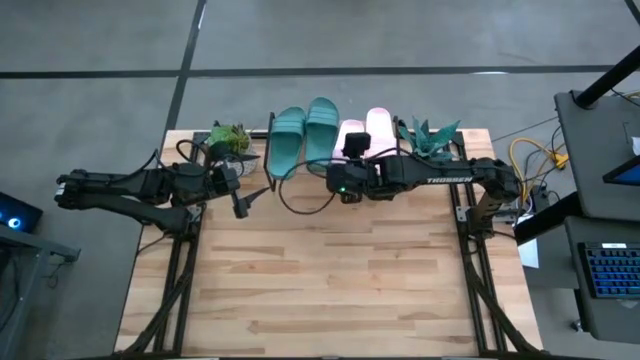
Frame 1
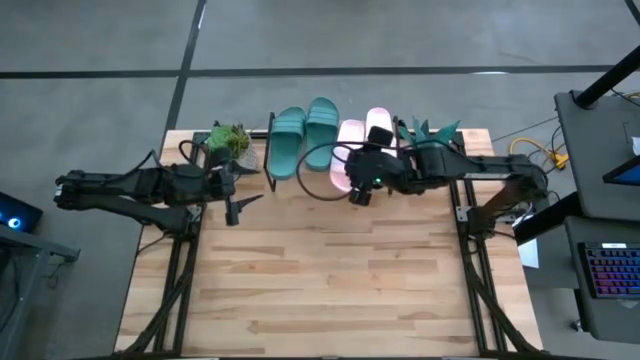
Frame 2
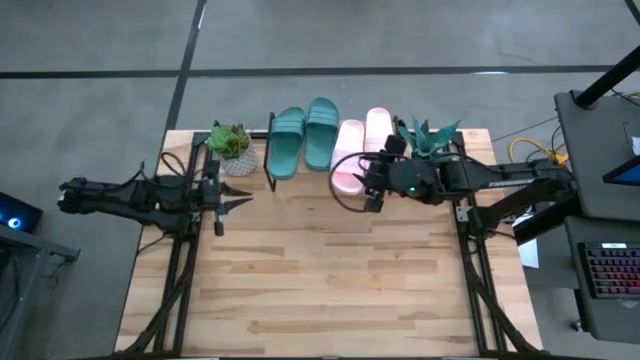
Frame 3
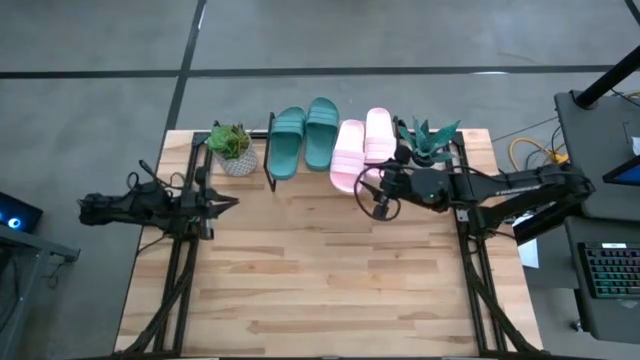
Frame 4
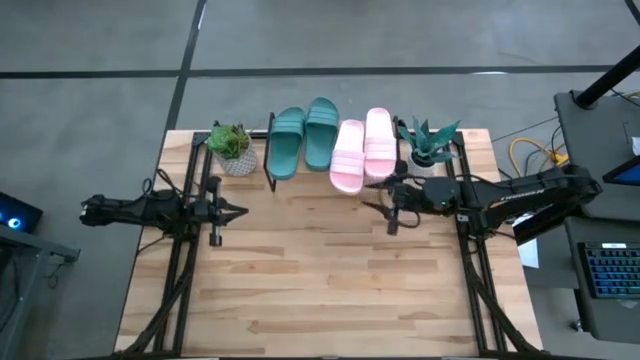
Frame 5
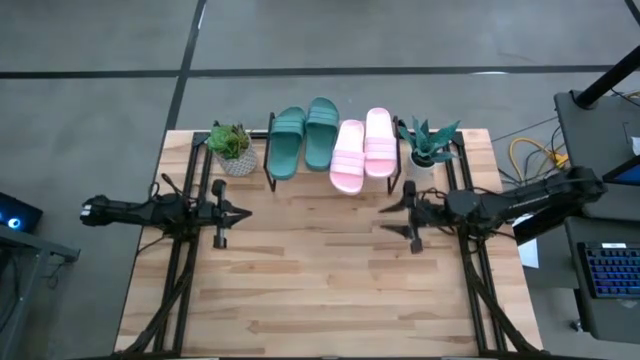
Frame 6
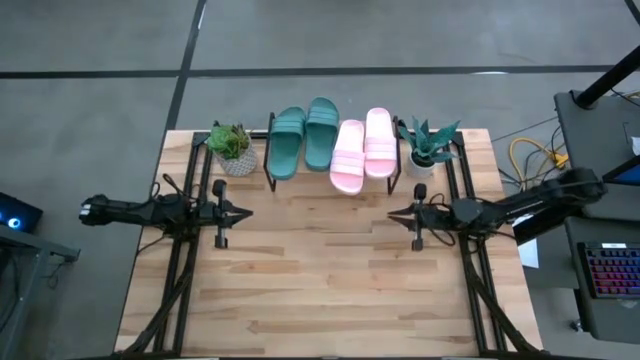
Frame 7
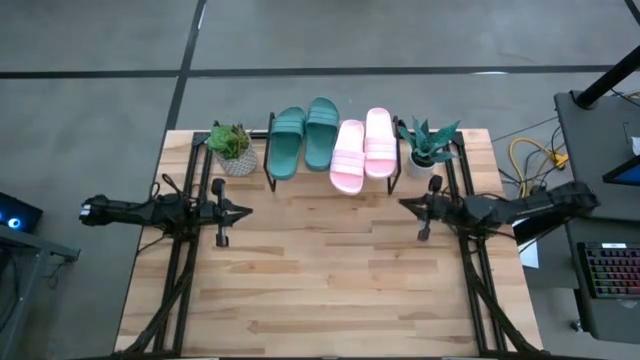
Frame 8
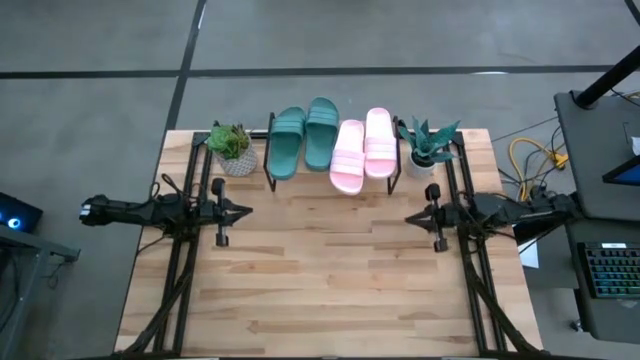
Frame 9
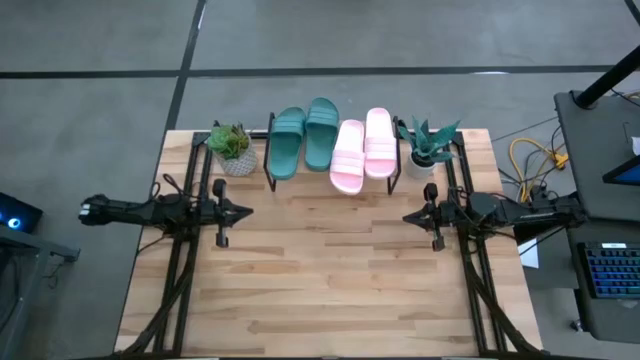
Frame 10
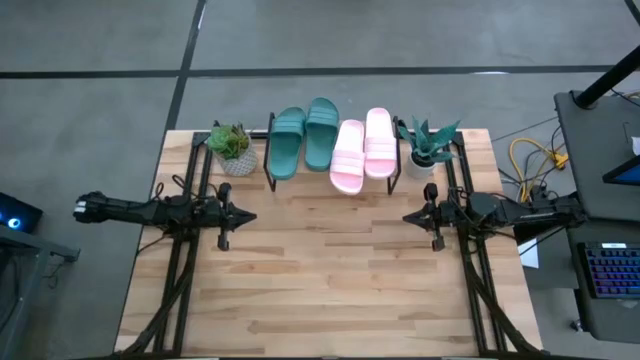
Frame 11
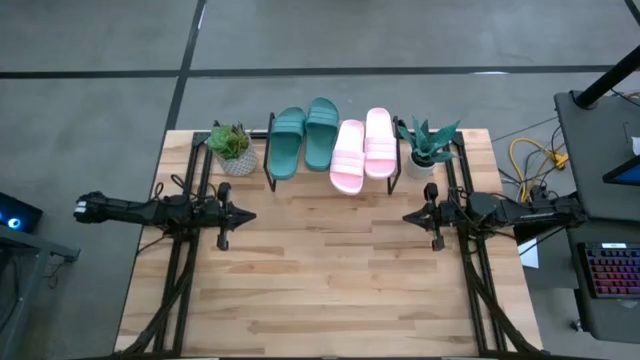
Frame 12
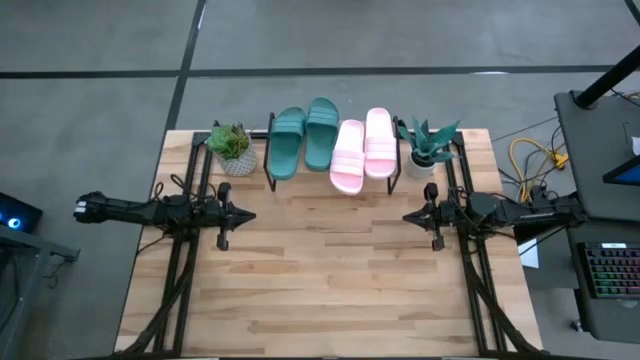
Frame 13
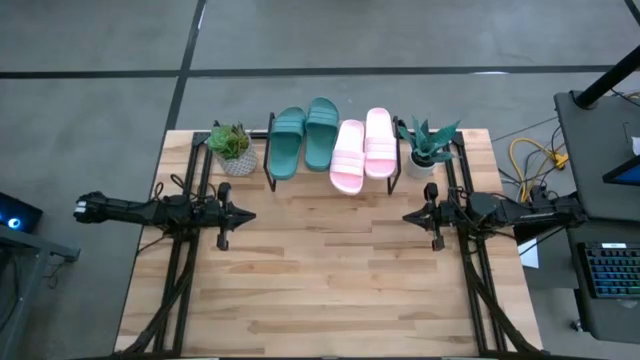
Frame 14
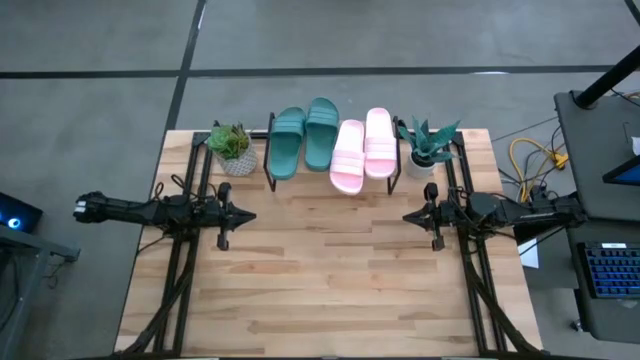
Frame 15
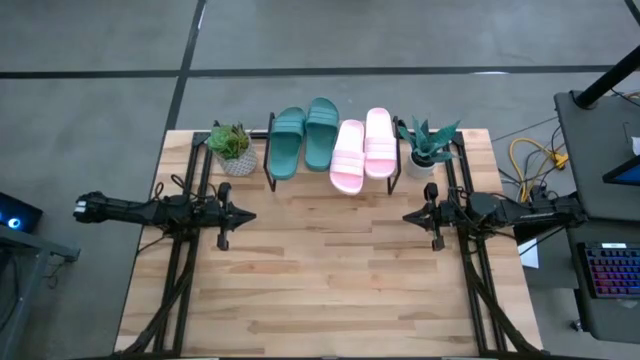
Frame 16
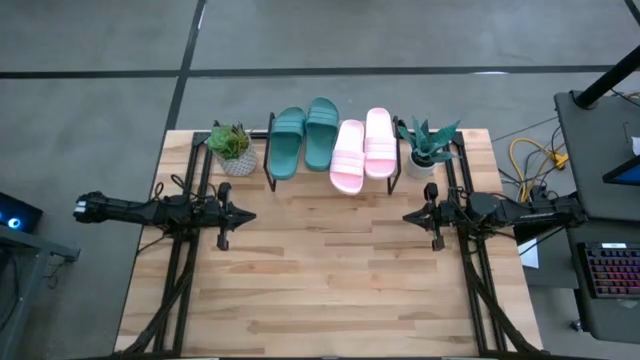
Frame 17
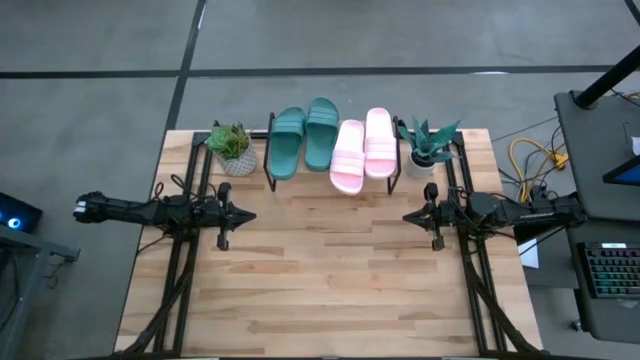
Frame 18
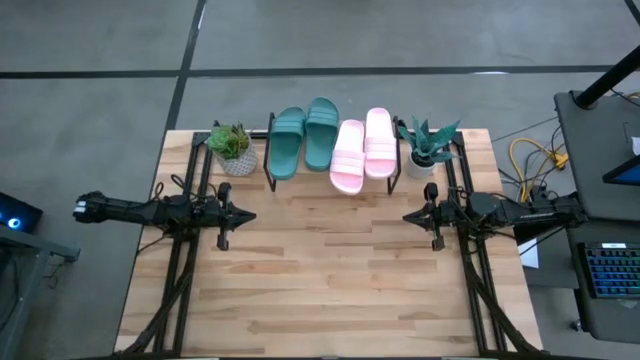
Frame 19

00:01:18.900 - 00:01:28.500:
Task: Pick and place slides into the shelf
Return to Home Position

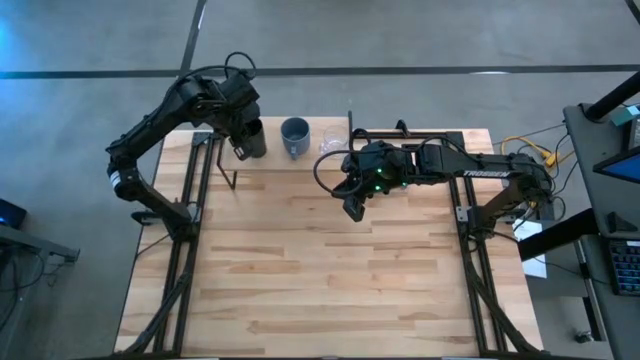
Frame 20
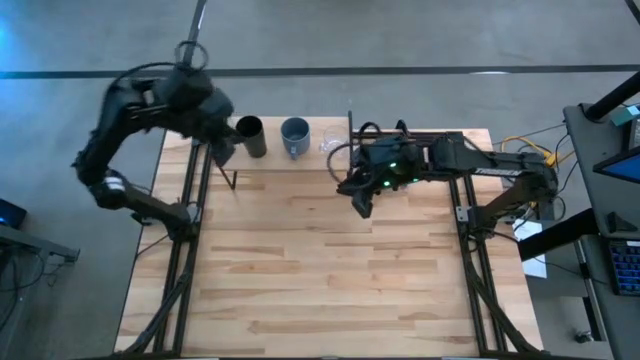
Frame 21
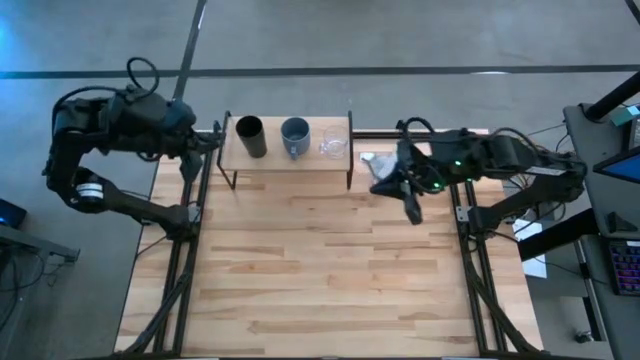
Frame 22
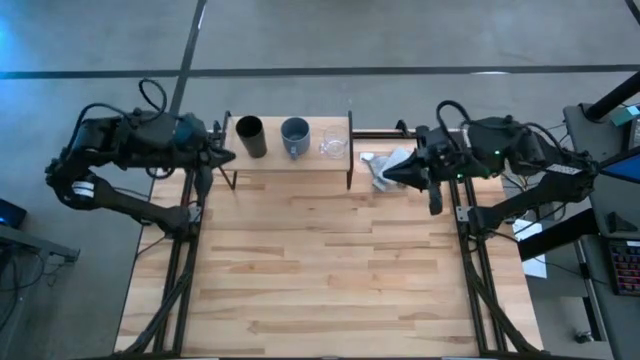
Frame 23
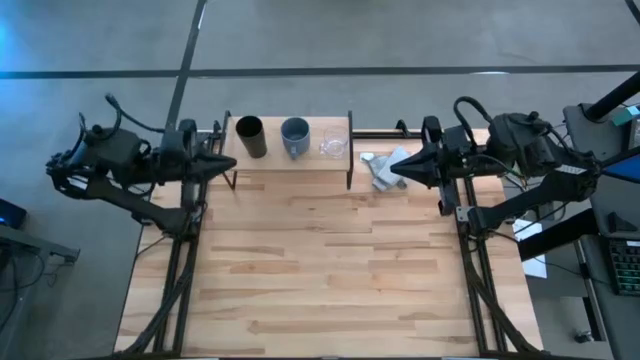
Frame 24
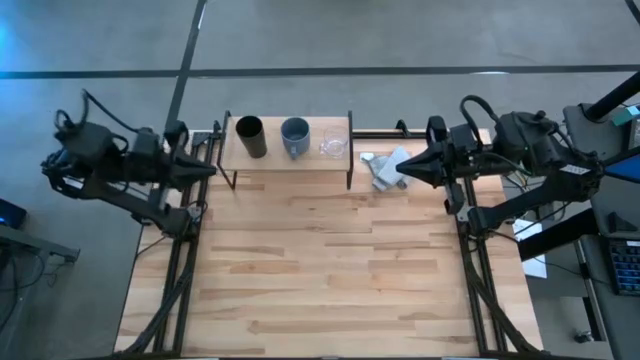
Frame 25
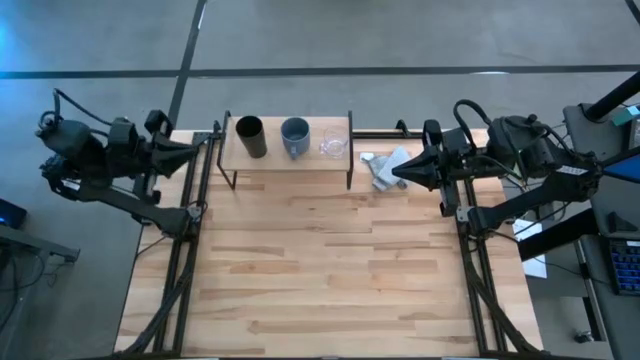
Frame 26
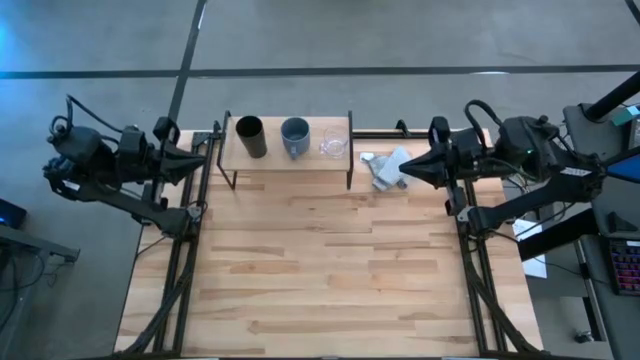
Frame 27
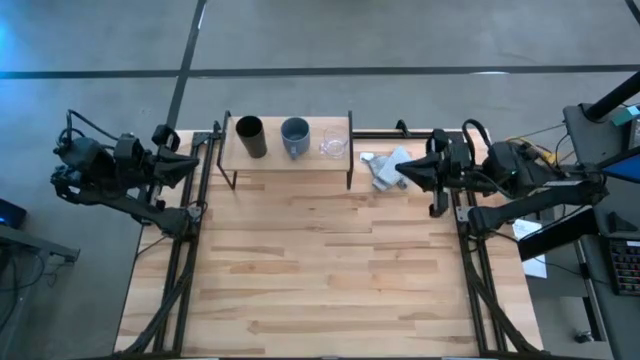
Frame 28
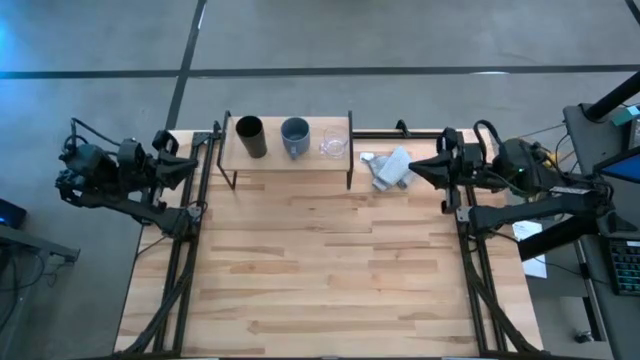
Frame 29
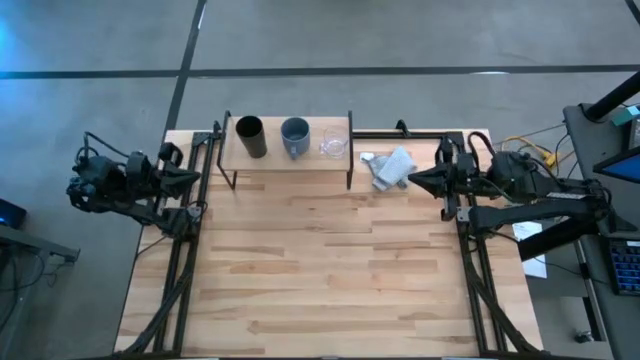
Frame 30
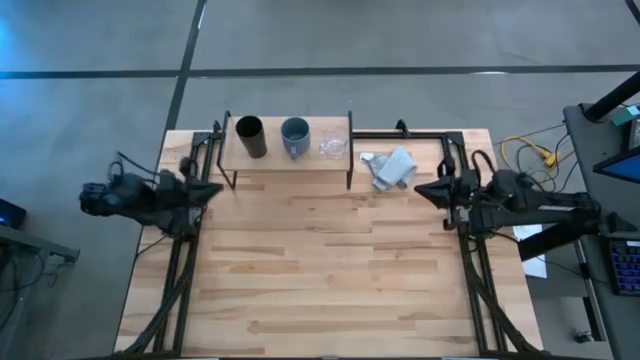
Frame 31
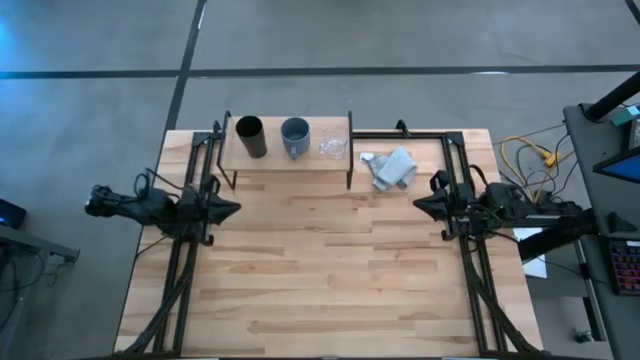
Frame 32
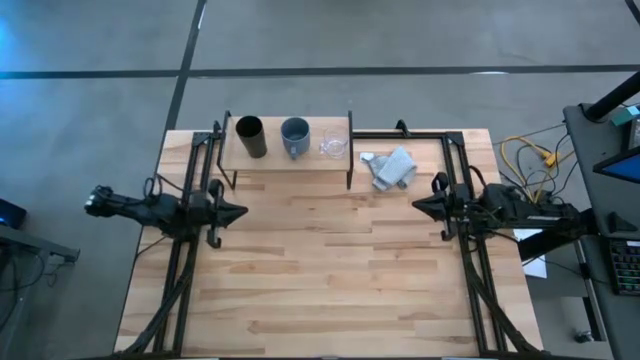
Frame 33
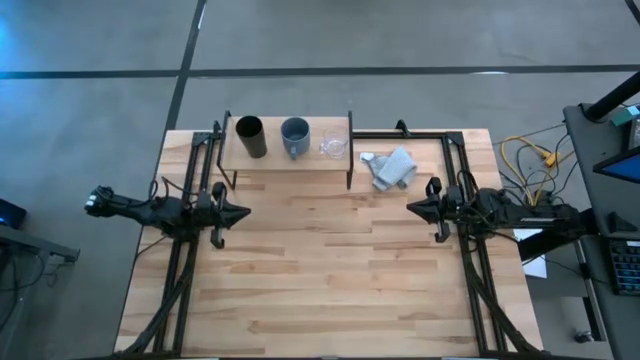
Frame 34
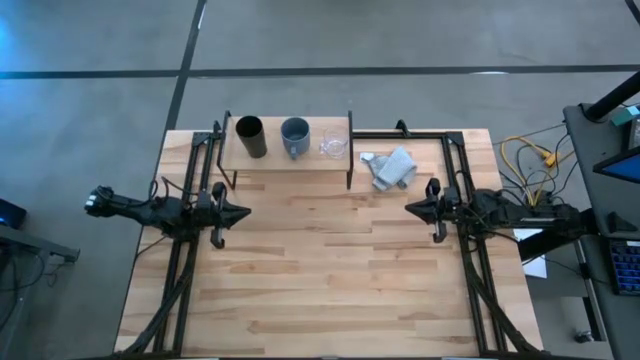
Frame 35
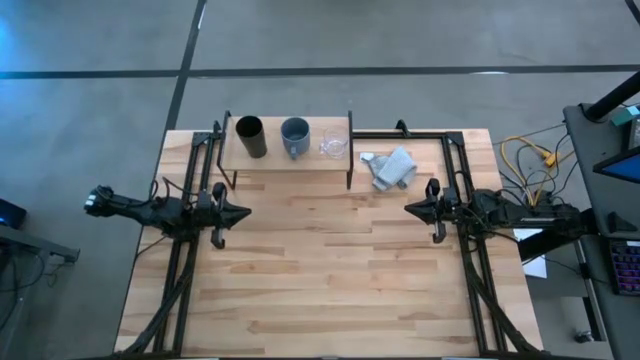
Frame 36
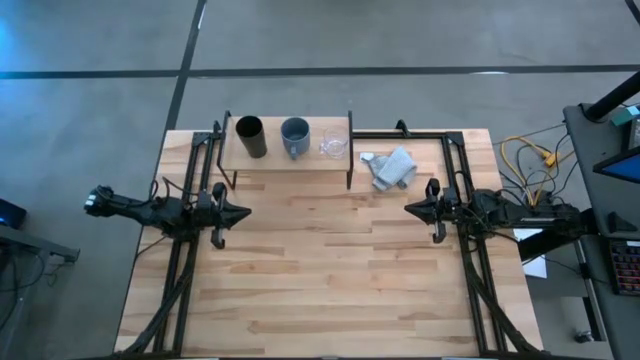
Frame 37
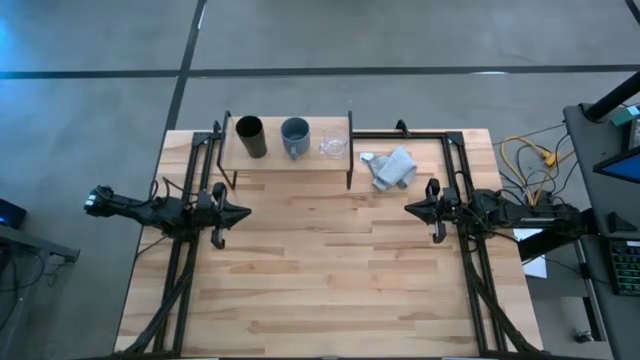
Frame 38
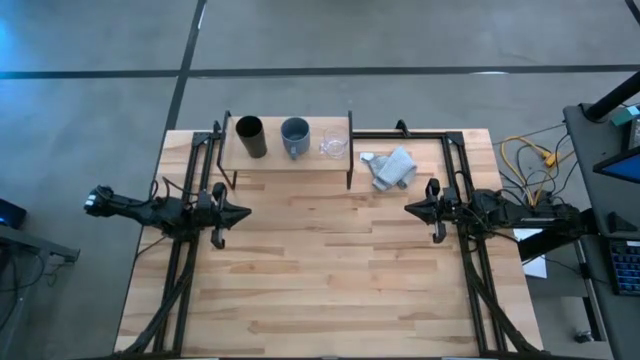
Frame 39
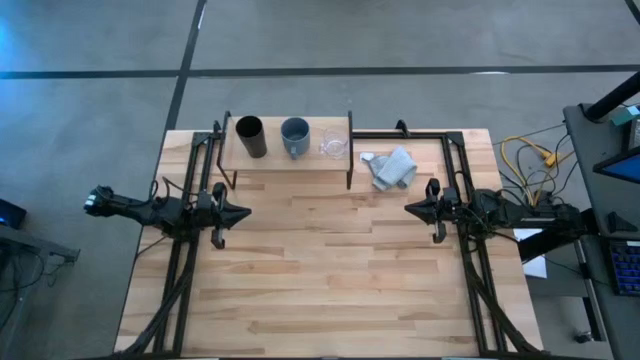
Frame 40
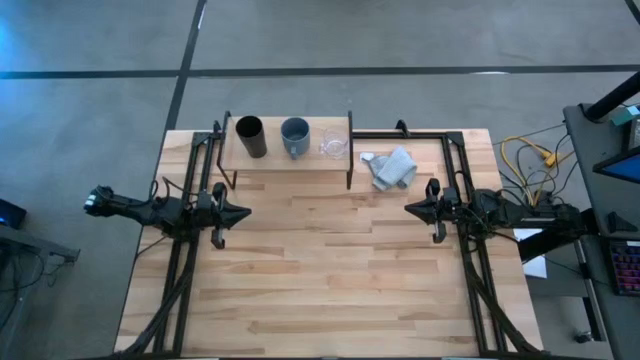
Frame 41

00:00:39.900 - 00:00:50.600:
Task: Stack small to large cups/mugs on shelf
Return to Home Position
